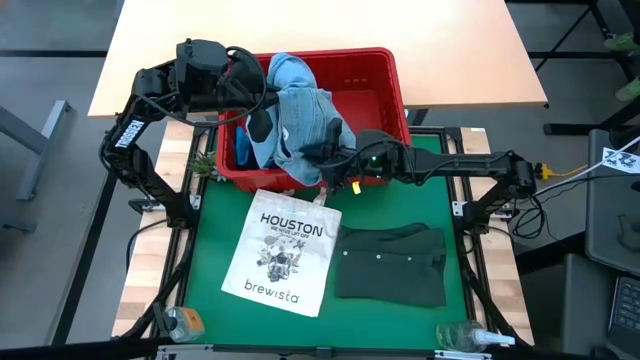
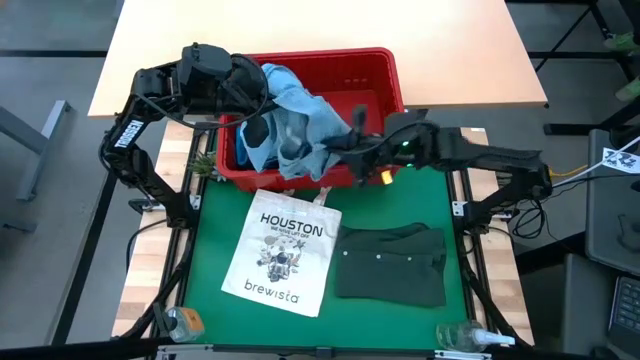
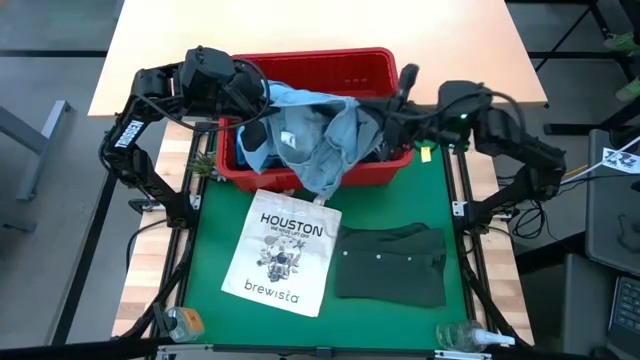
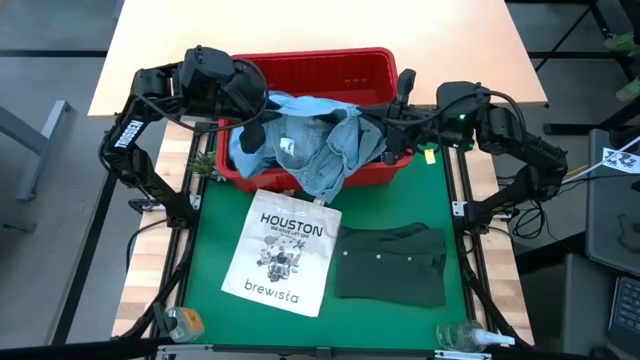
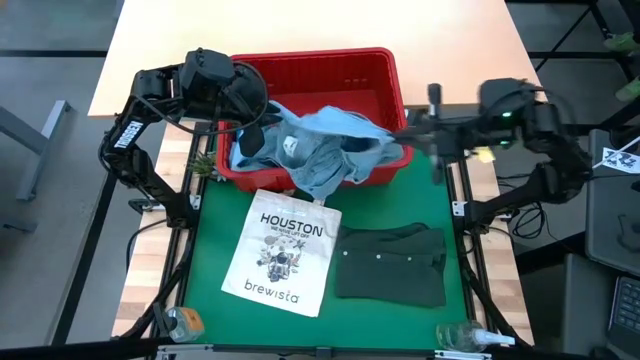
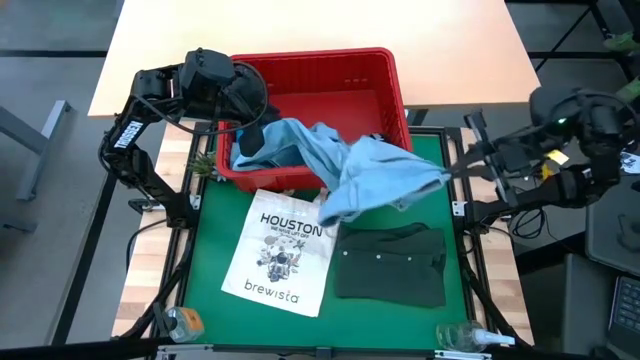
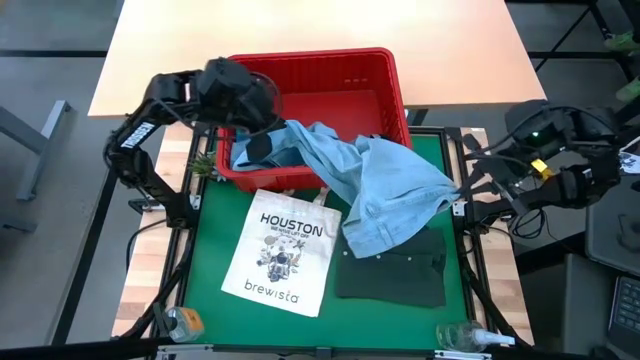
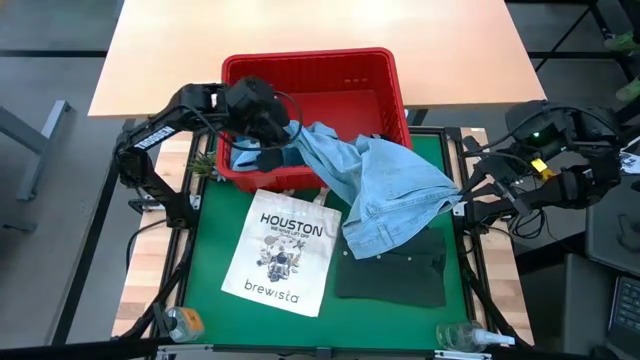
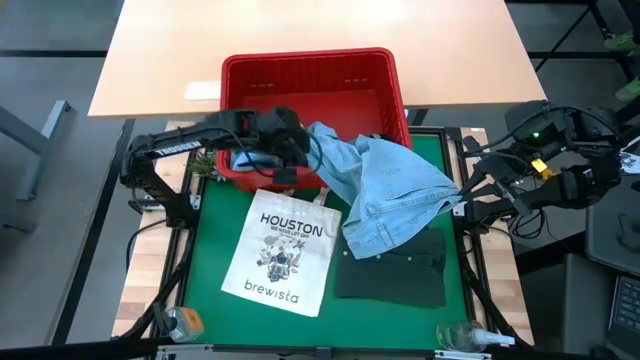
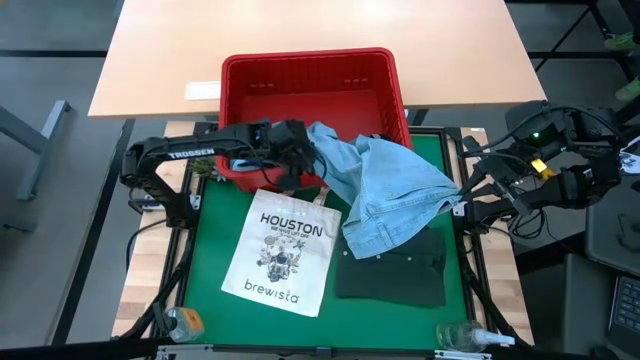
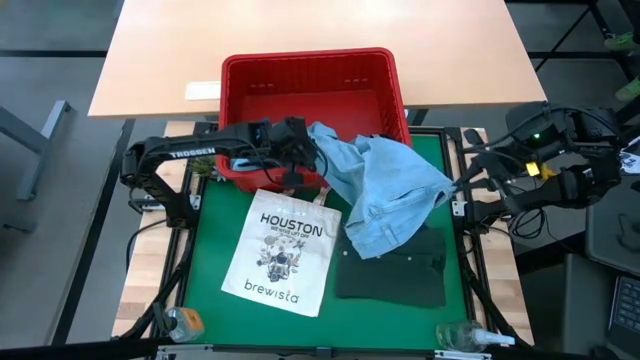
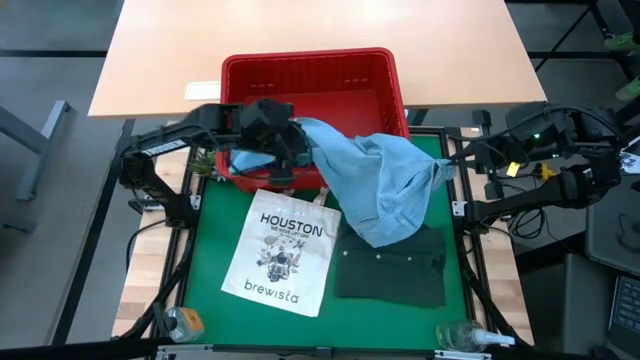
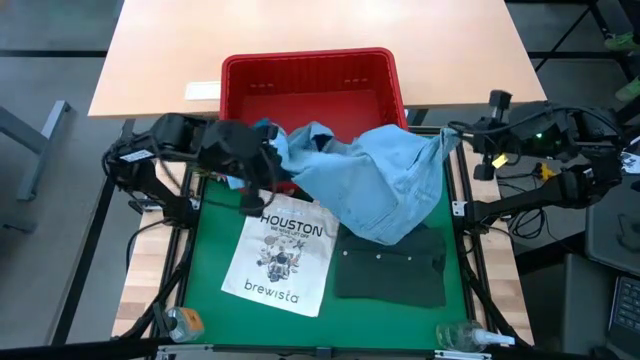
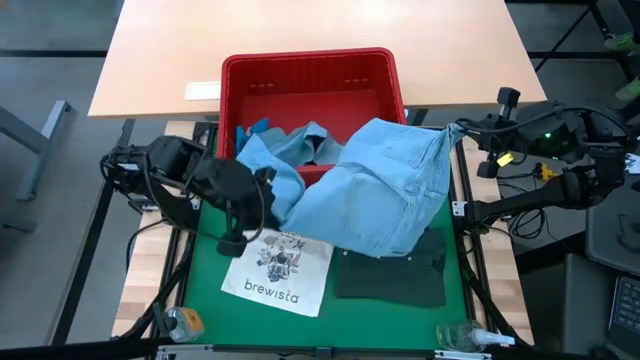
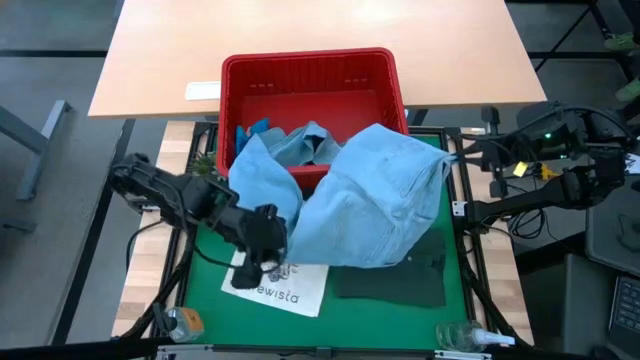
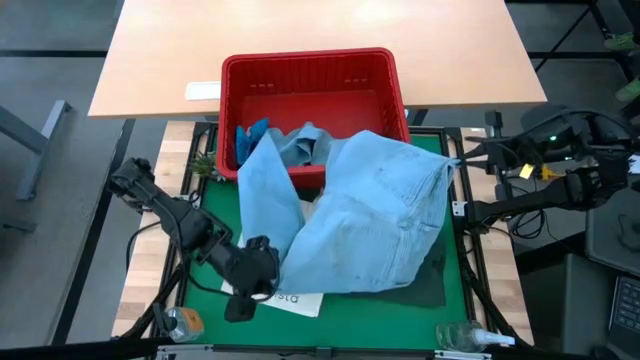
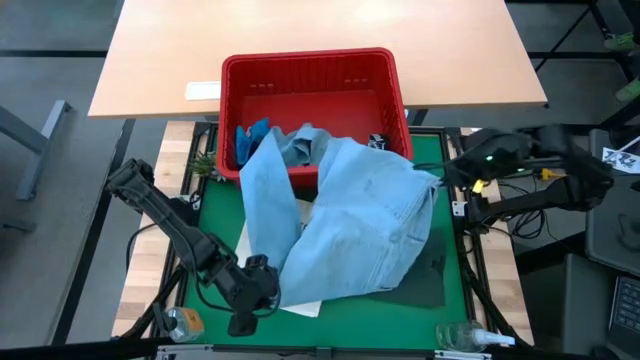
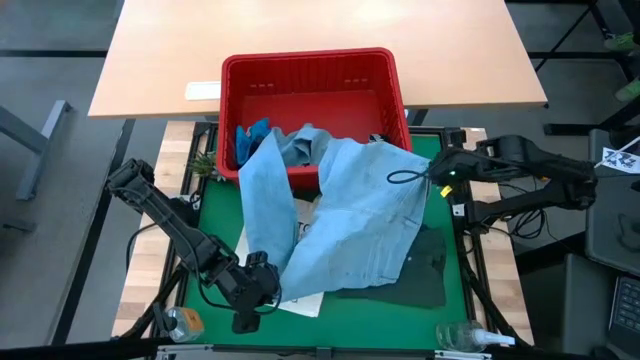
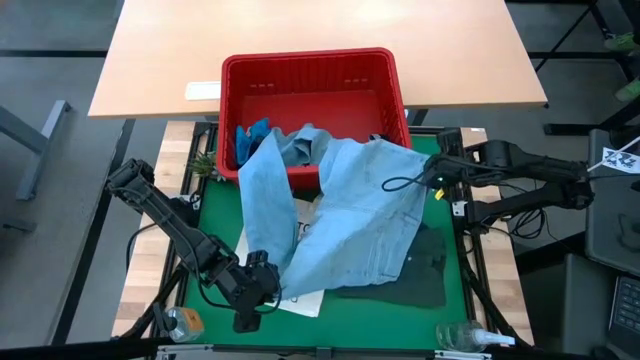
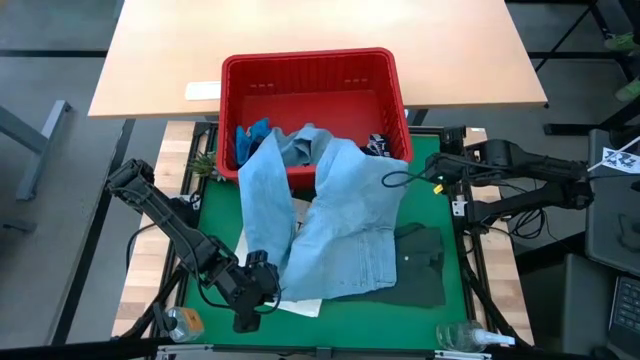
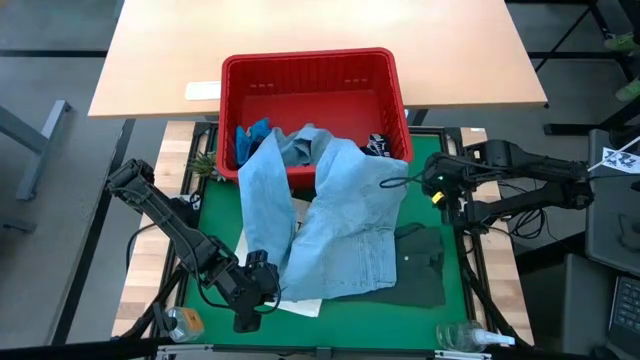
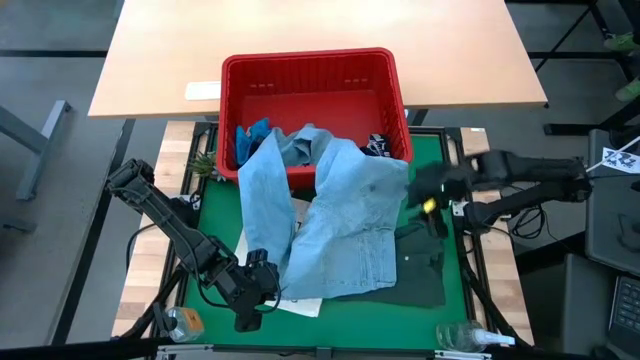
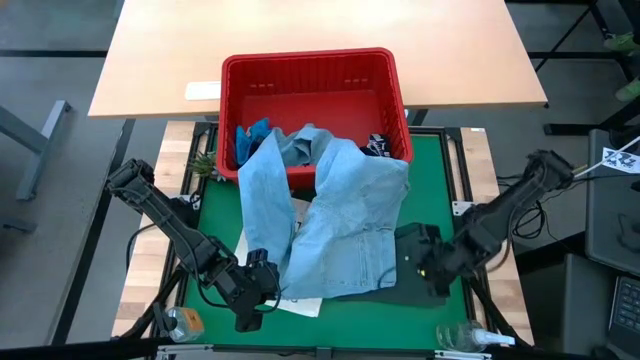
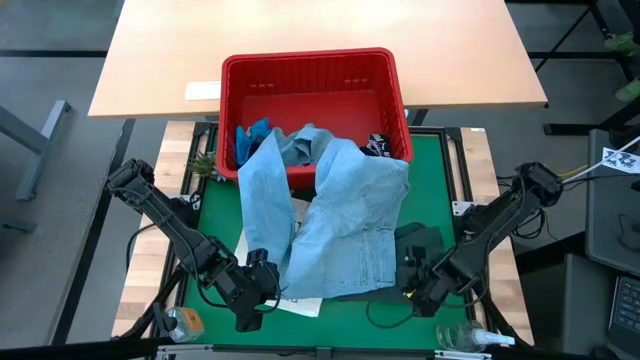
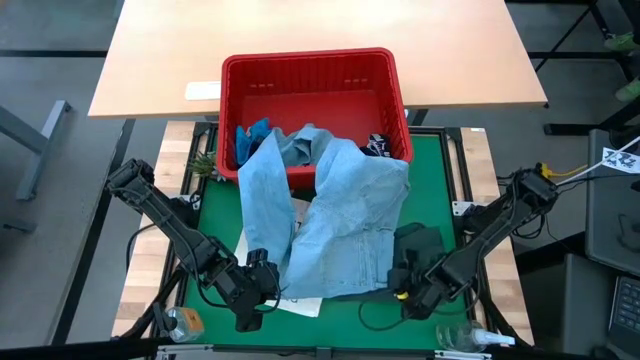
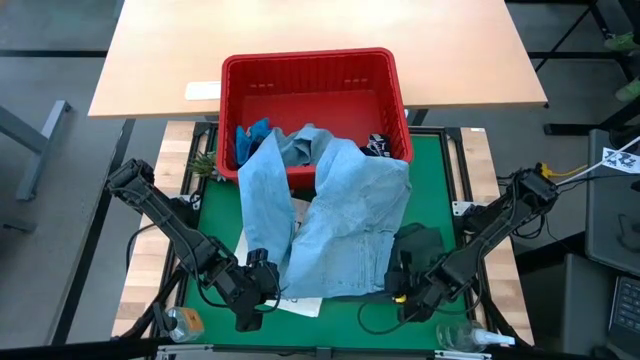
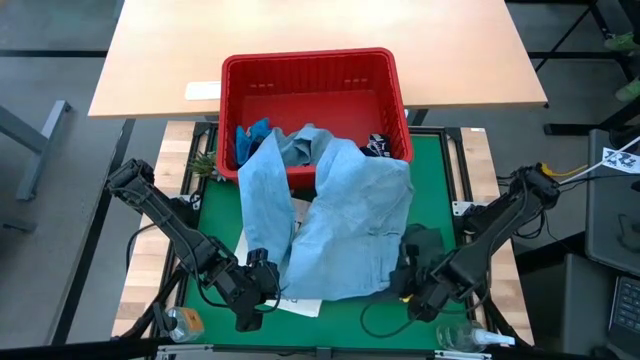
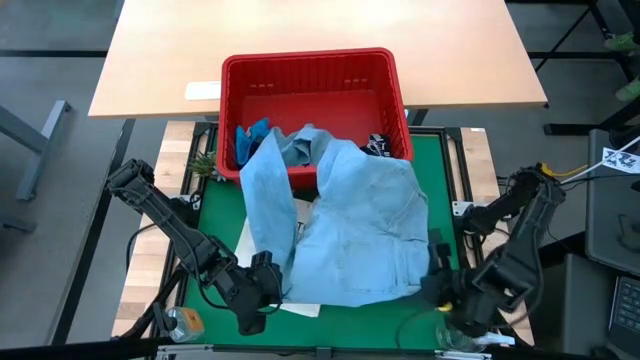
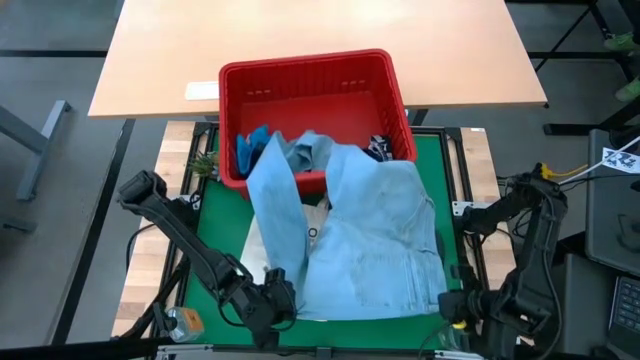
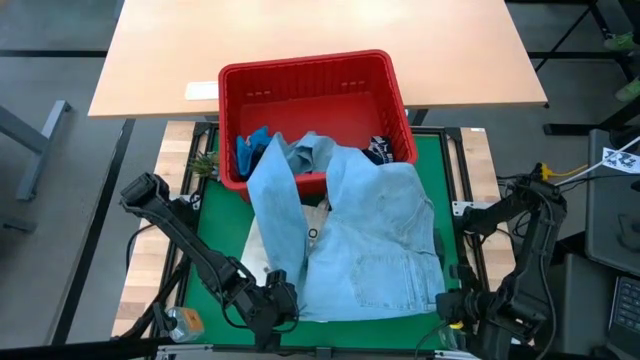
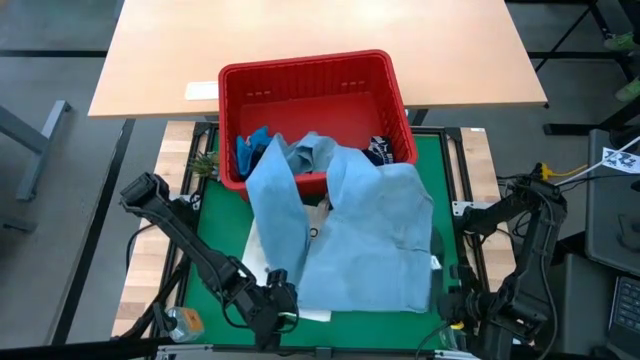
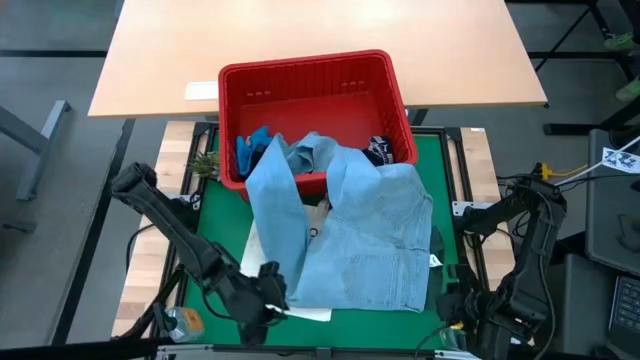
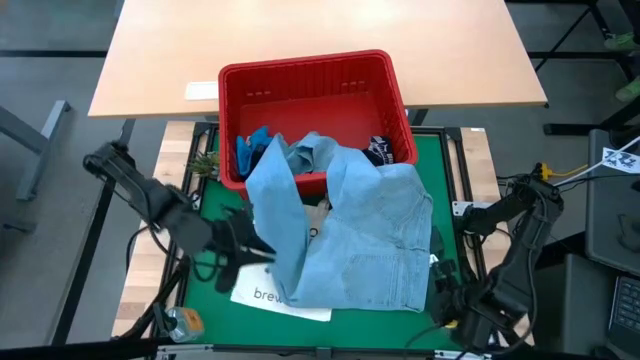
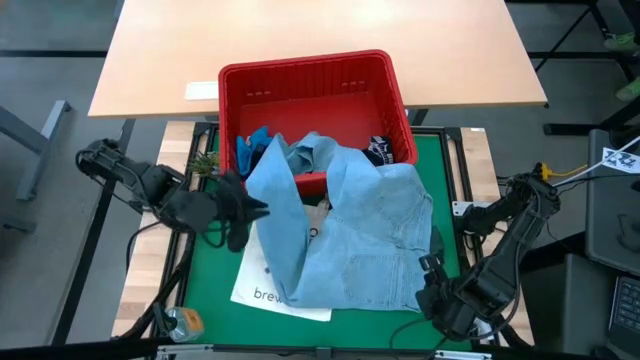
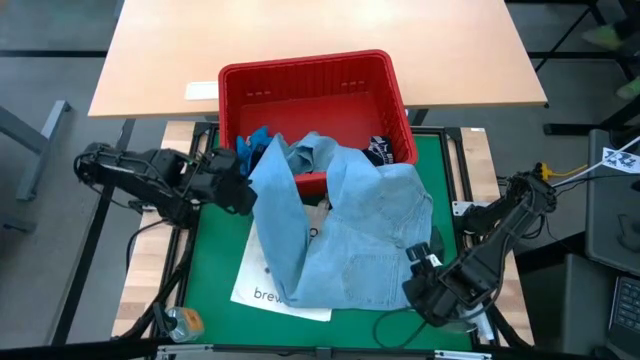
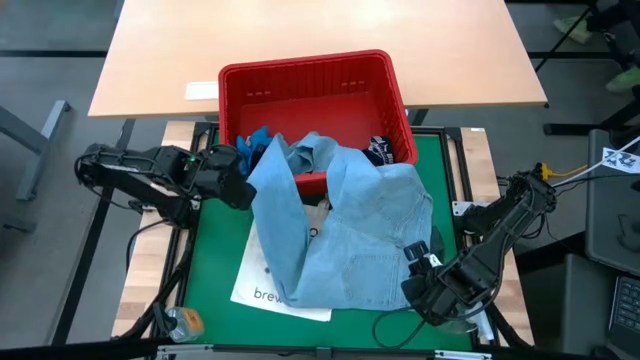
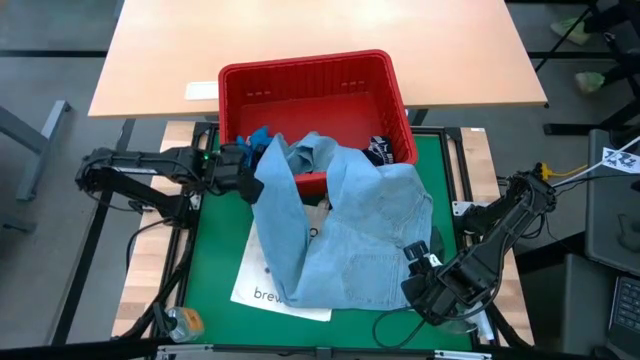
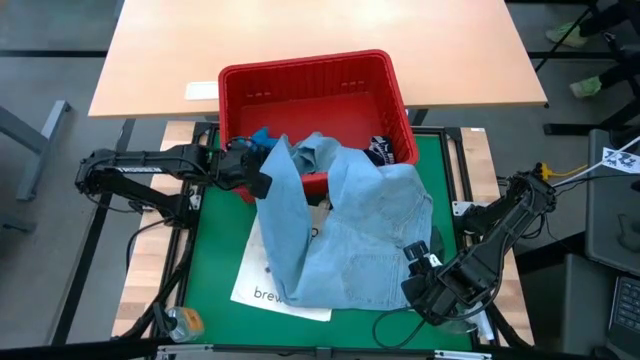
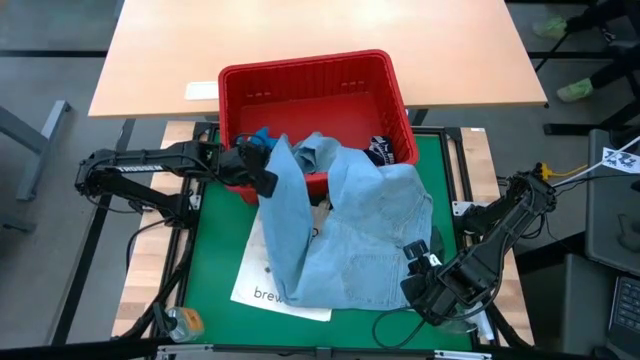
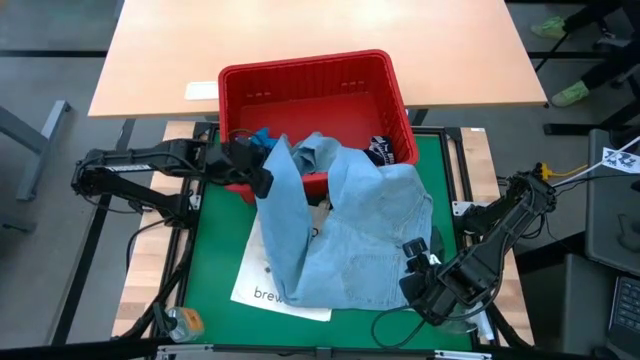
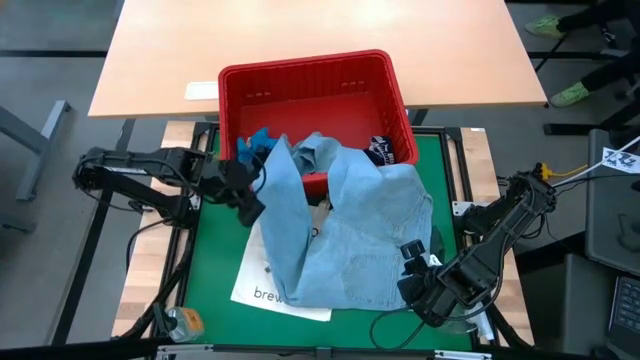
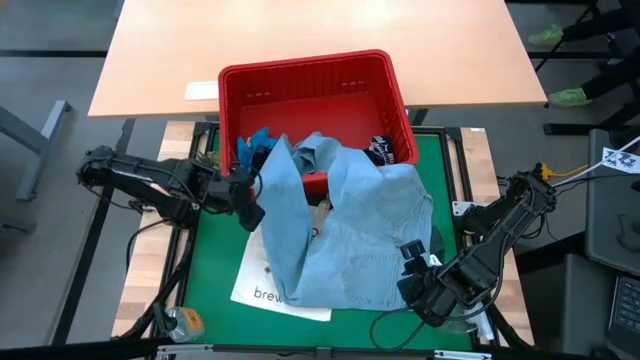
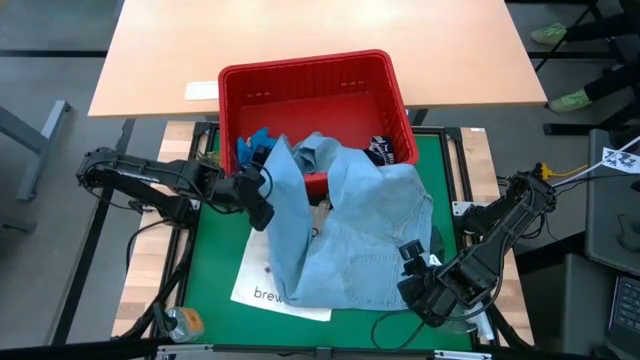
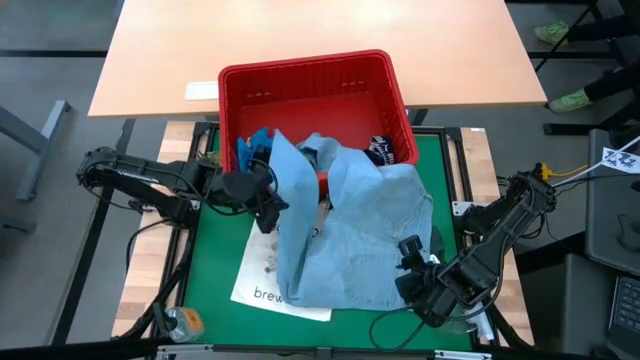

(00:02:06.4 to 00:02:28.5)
Task: Fold Laundry from Bin
Fold the light blue jeans
